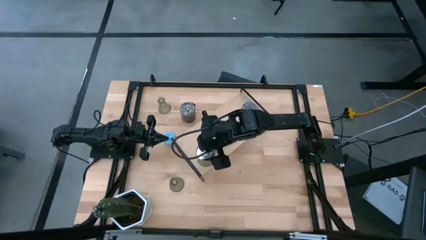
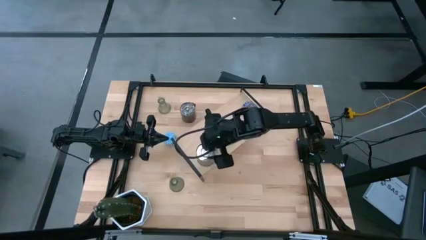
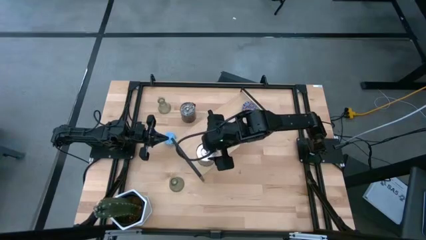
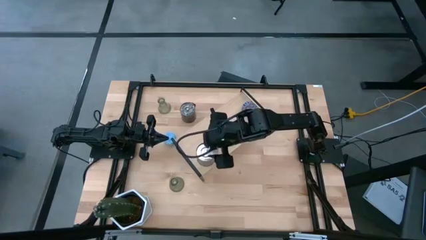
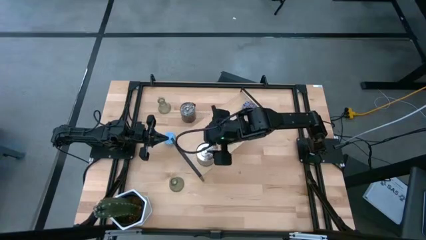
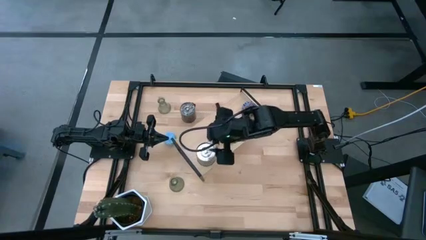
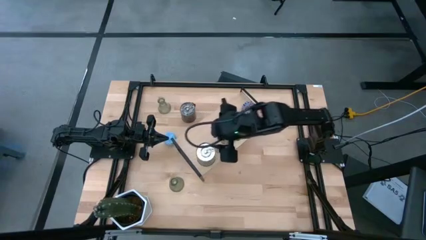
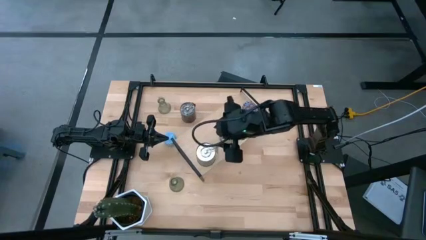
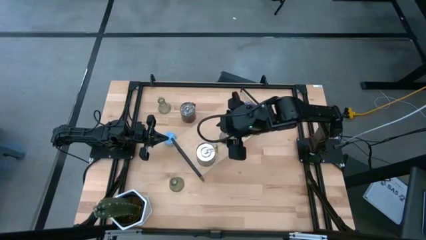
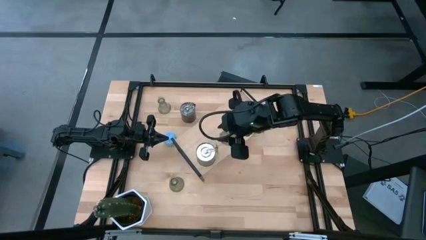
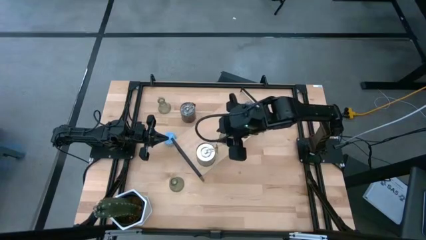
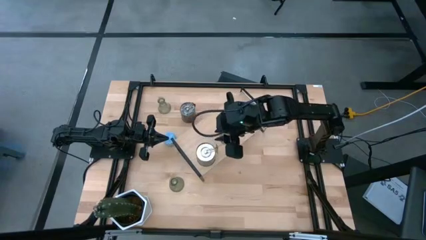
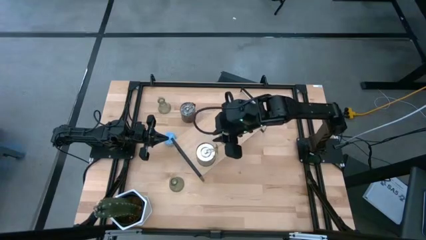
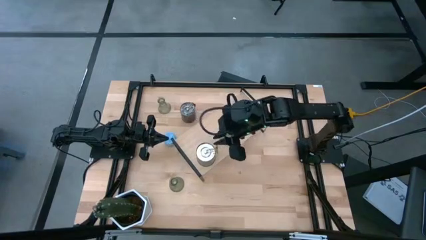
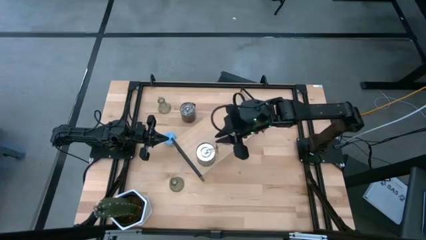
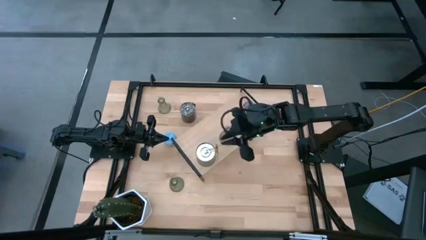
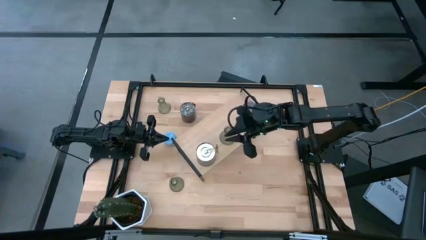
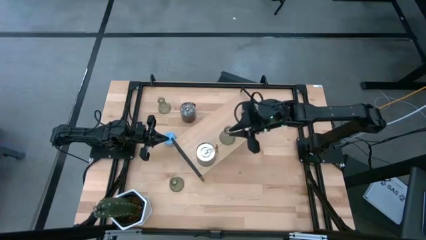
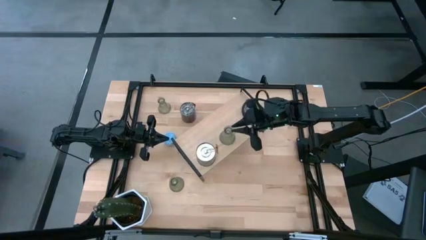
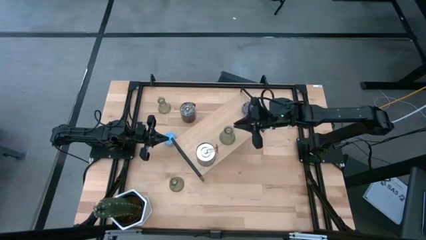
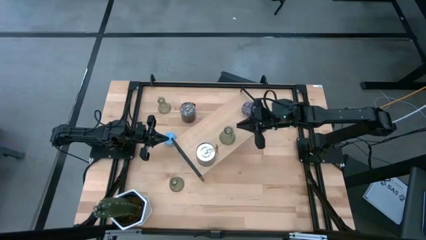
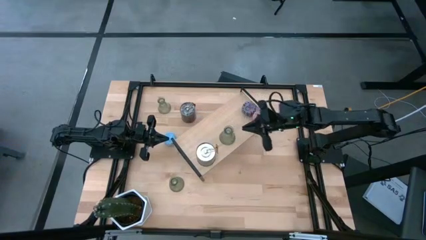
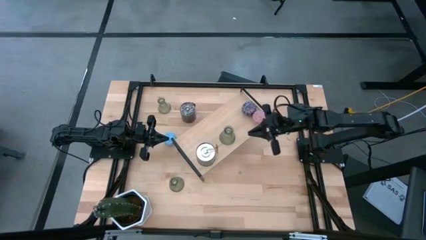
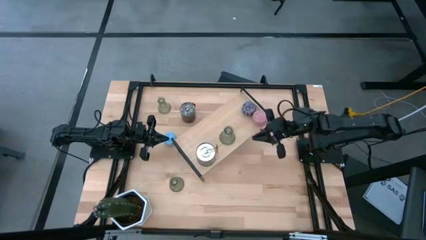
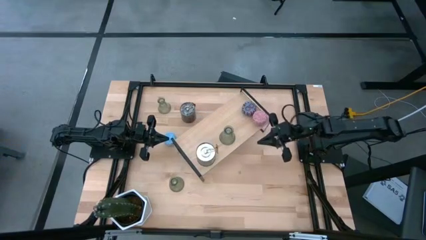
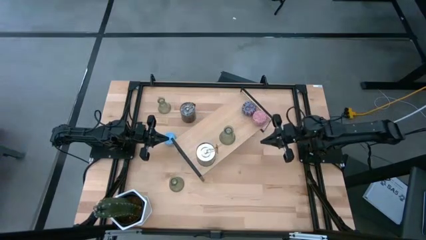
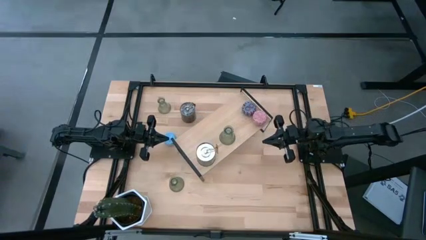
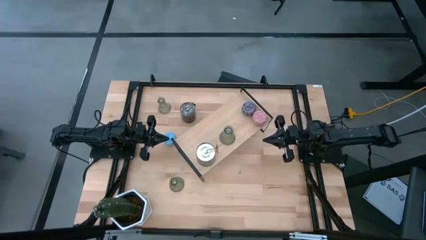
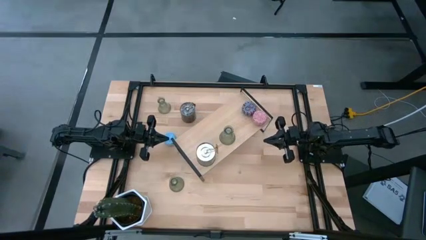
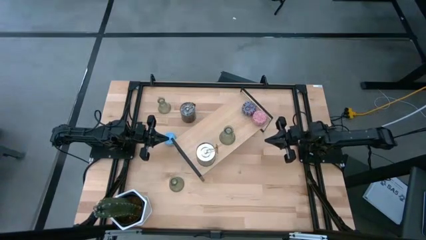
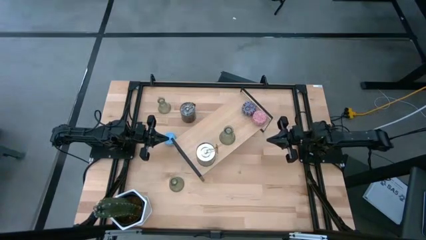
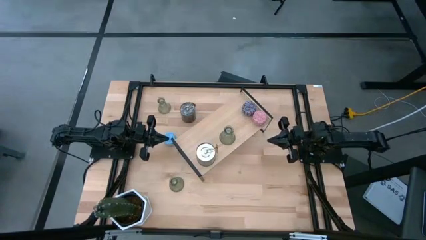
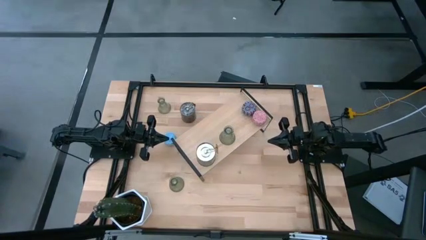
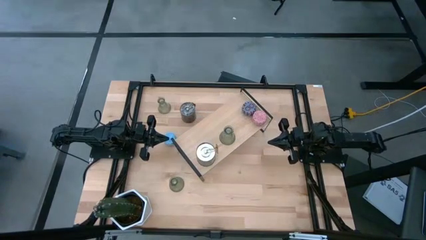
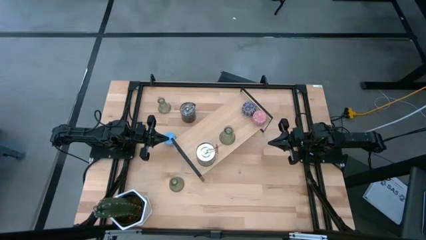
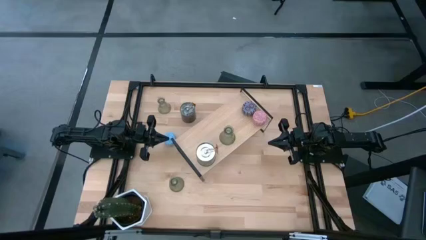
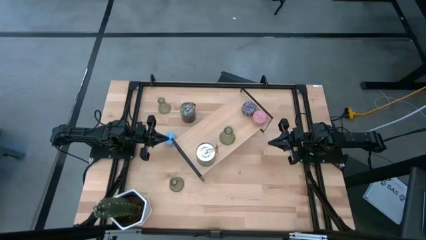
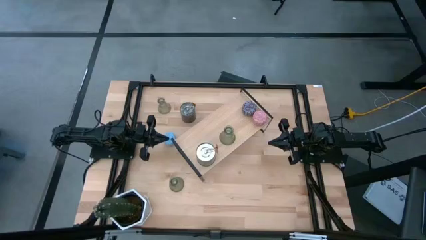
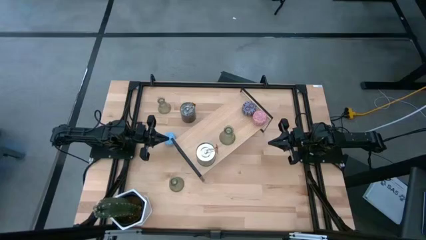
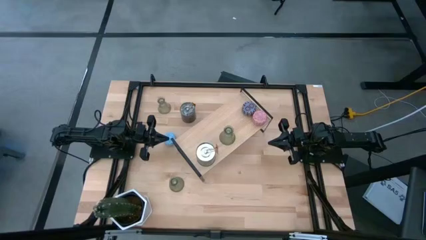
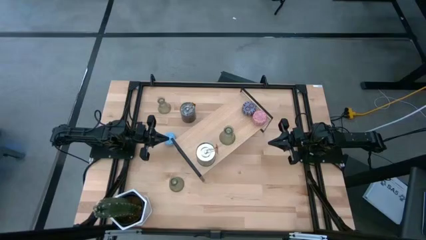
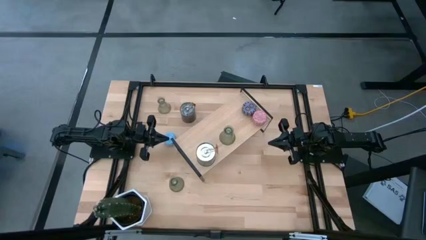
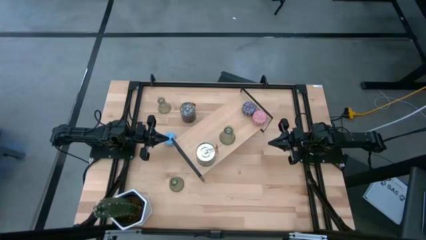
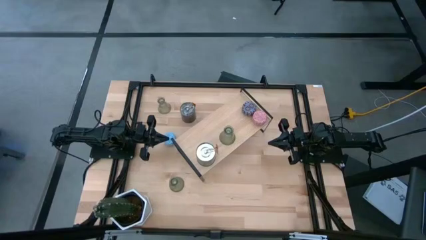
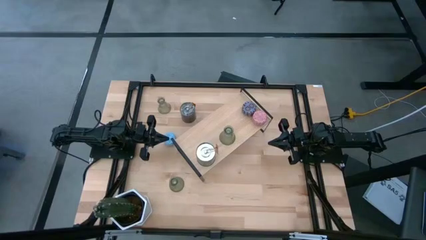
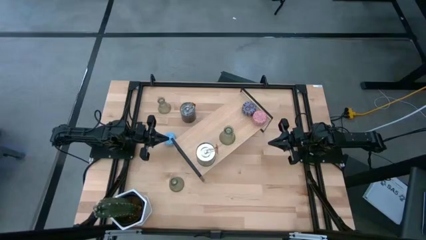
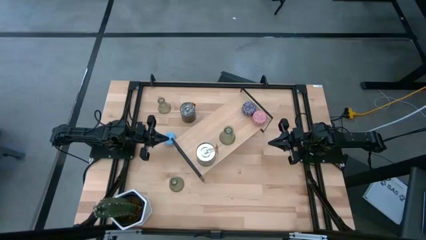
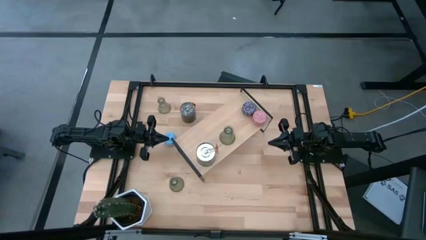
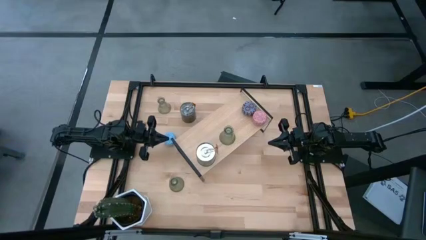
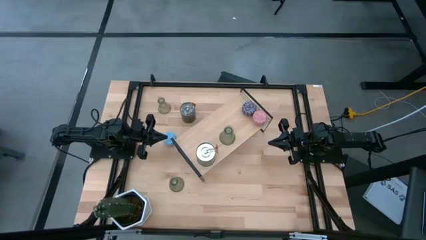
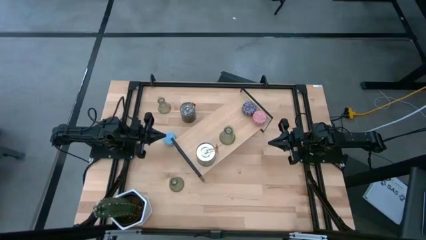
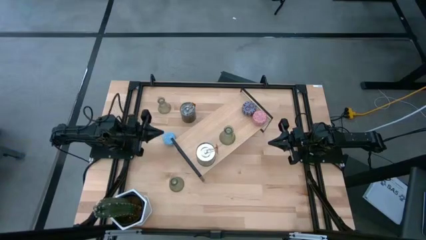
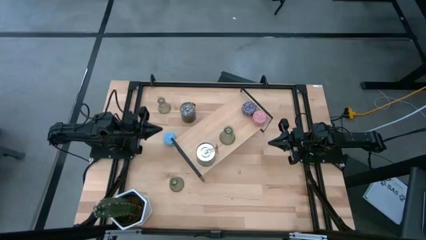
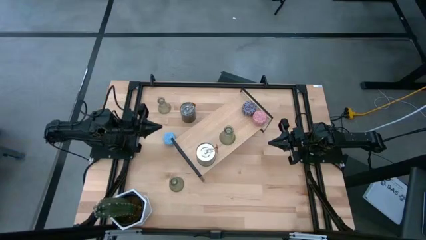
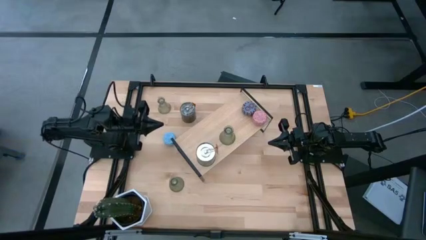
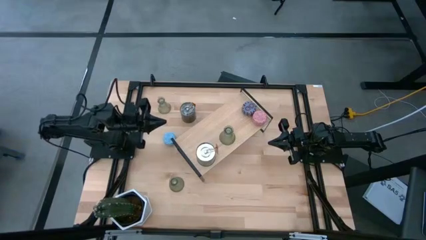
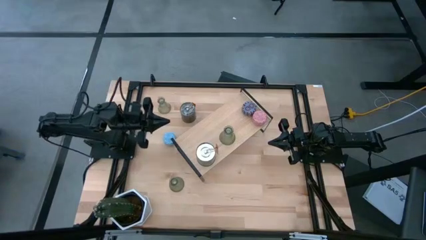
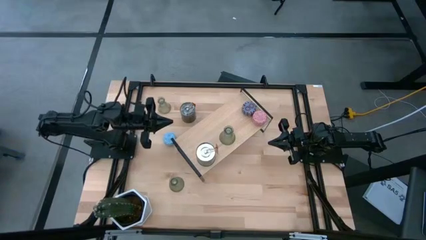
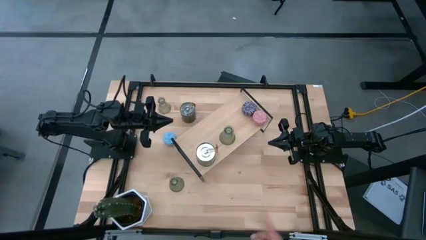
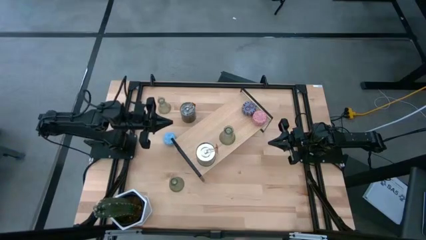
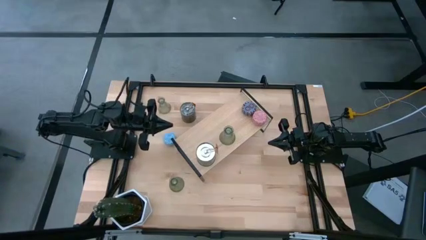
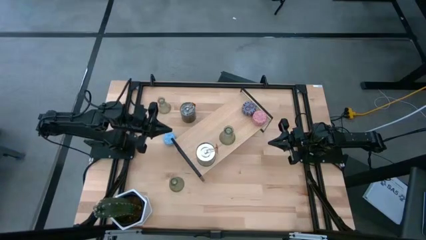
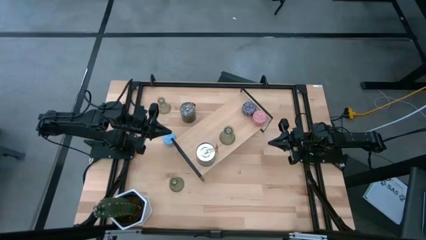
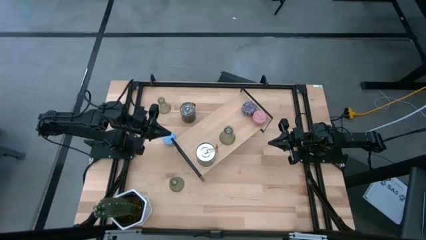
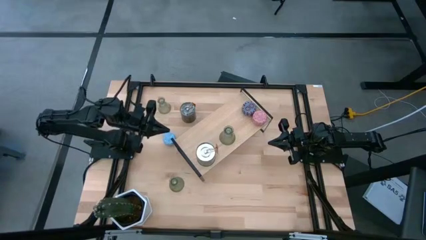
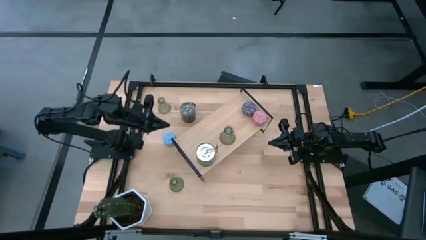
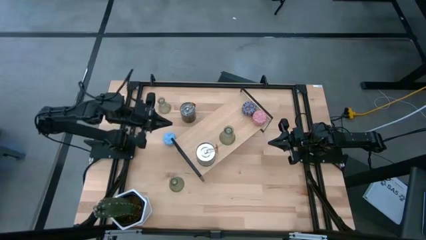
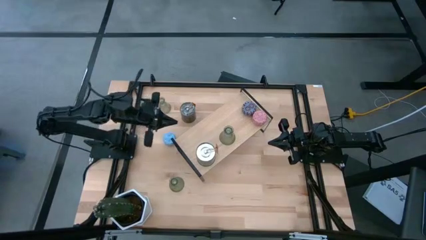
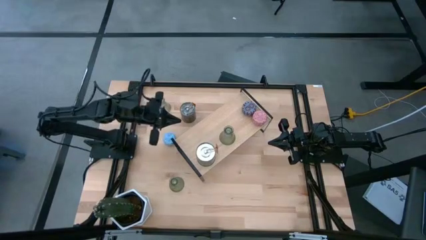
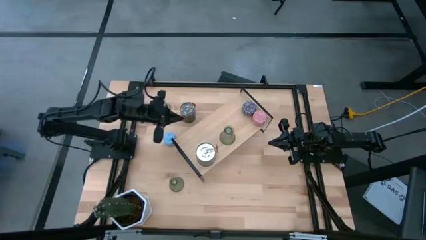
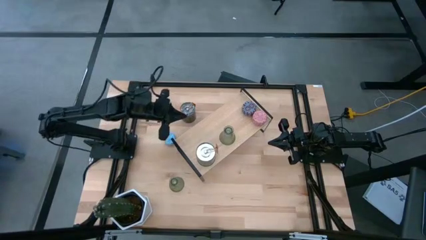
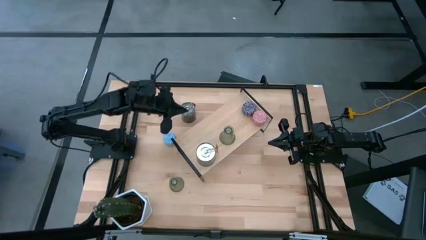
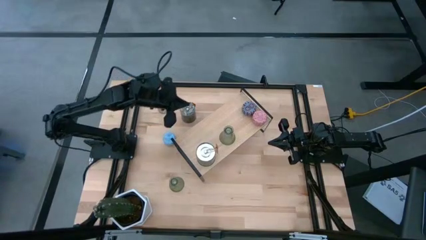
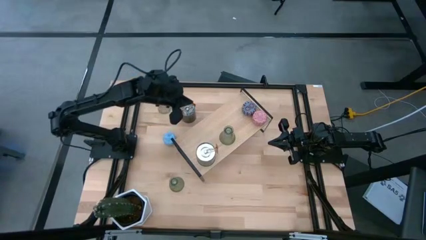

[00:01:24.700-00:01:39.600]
Task: Pick & Place candle stick holders
Put the silver scented candle on the shelf aligned with the other silver scented candle

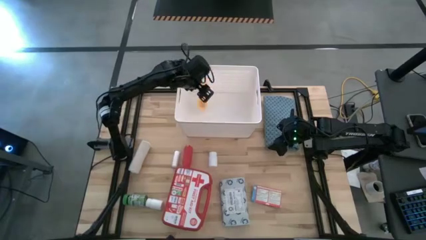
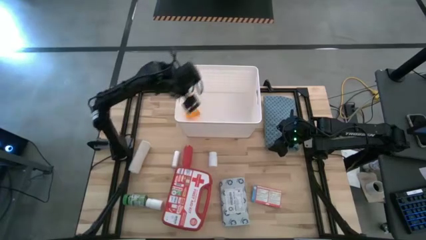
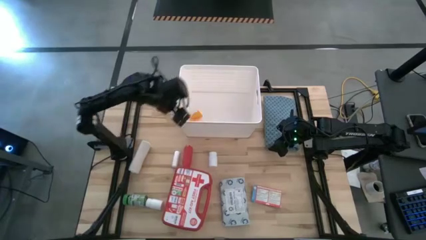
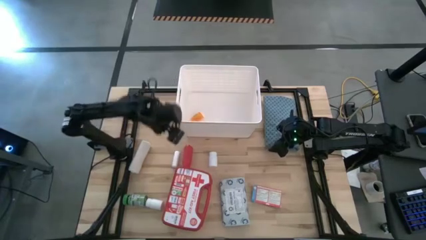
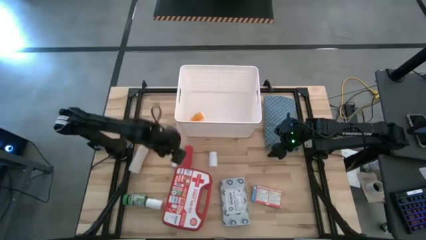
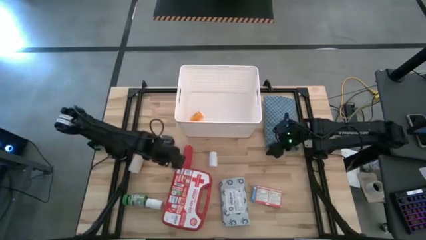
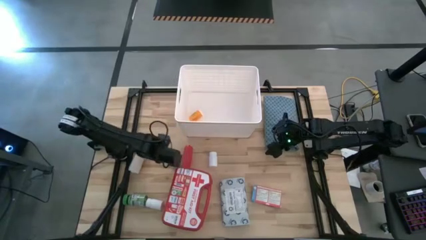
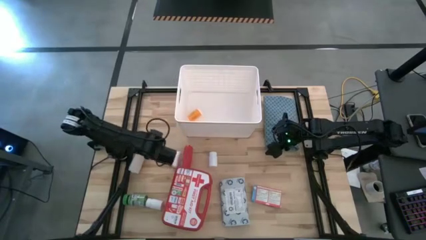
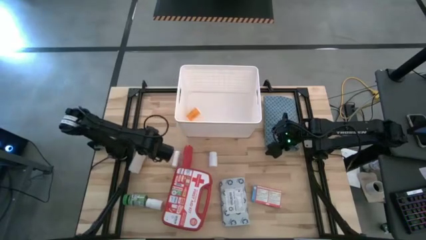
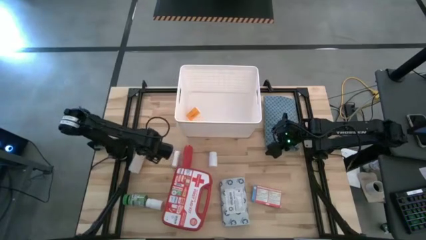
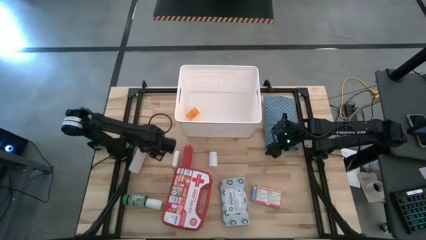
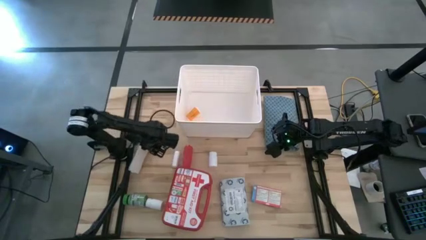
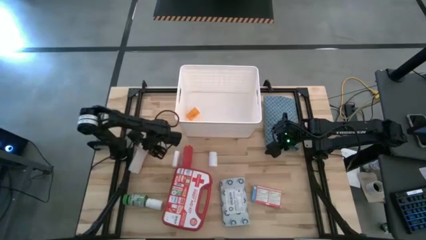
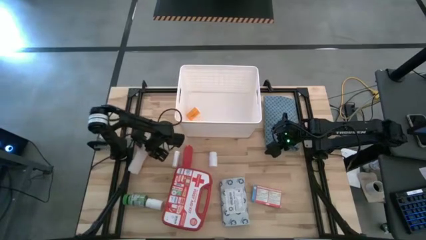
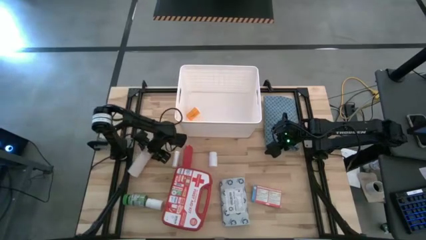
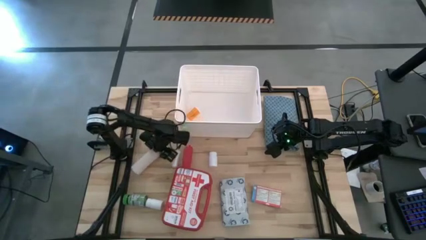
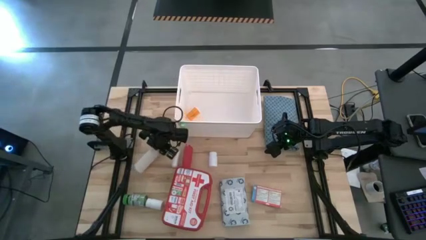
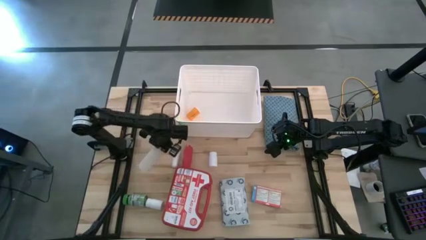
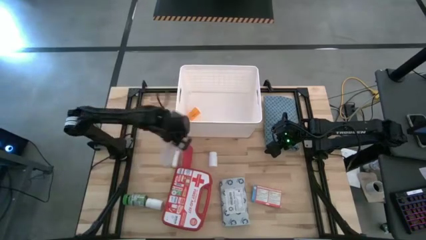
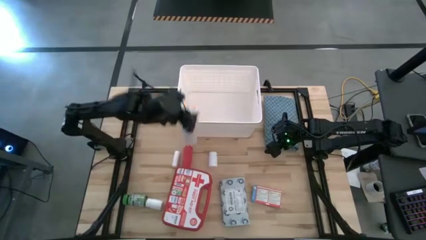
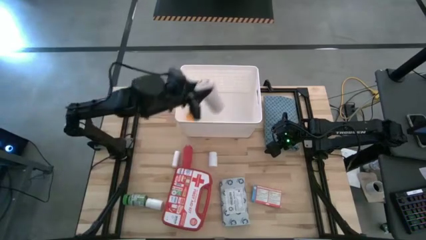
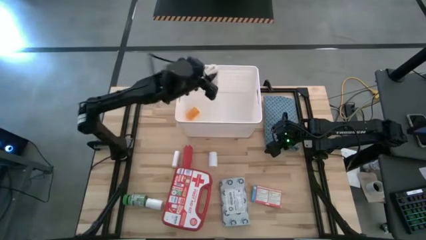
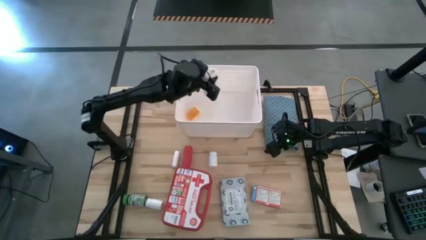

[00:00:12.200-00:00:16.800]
Task: Pick & place medical supplies in basket/bin
Put the white bandage into the white bin
